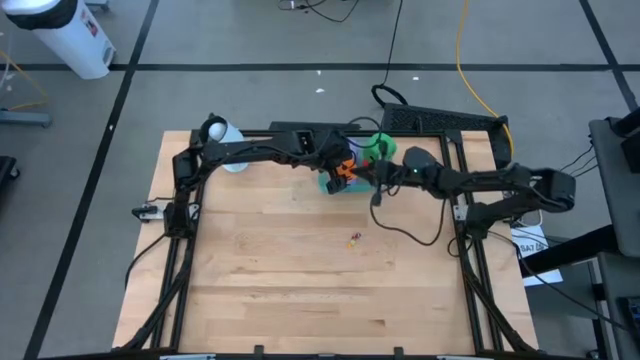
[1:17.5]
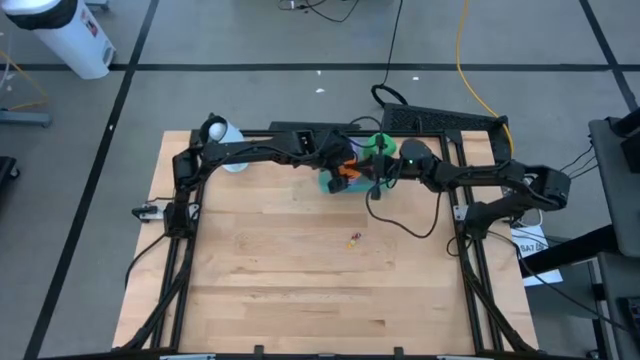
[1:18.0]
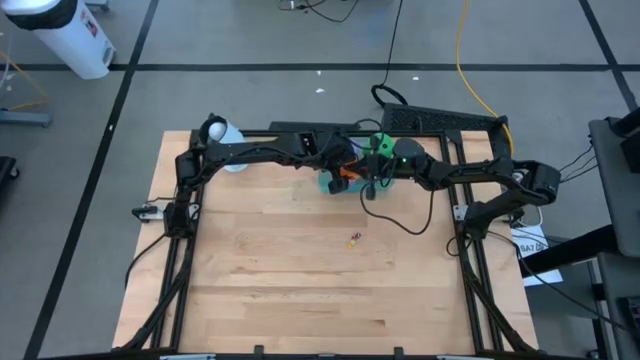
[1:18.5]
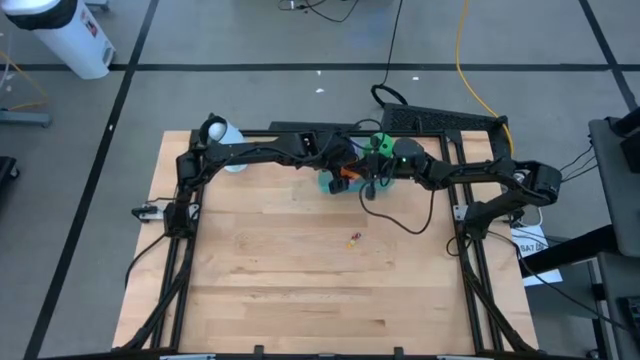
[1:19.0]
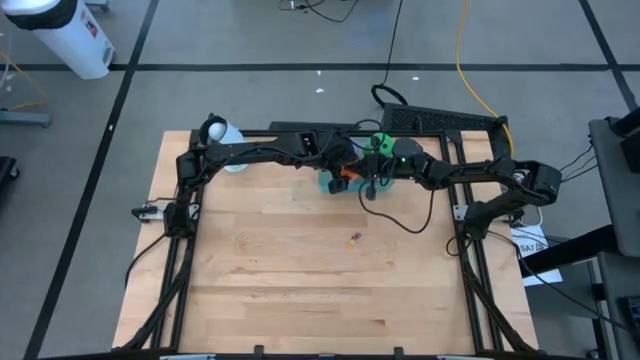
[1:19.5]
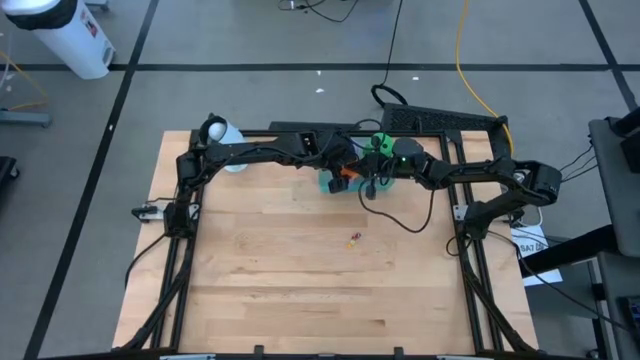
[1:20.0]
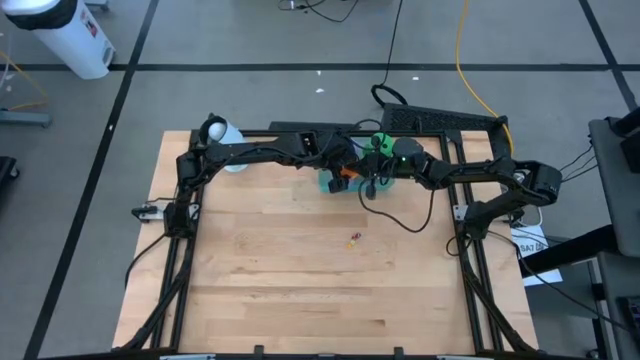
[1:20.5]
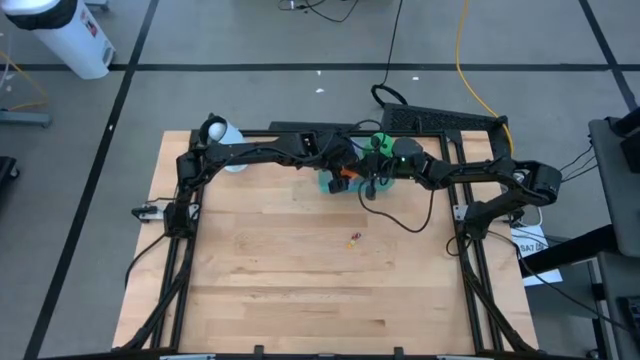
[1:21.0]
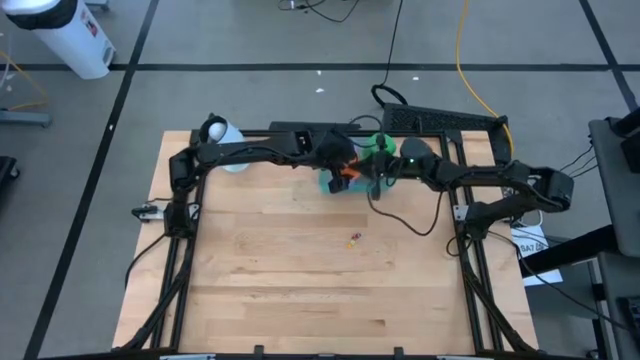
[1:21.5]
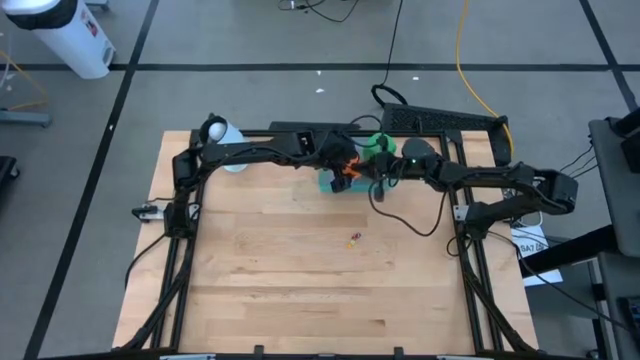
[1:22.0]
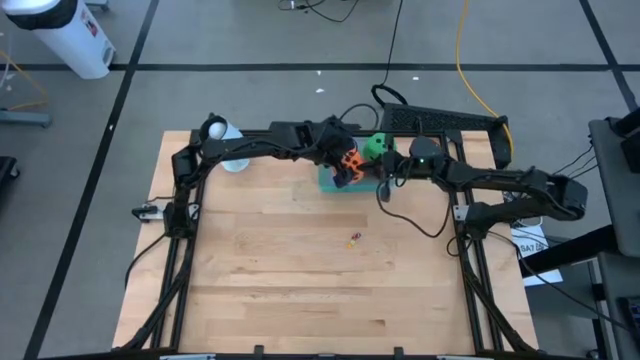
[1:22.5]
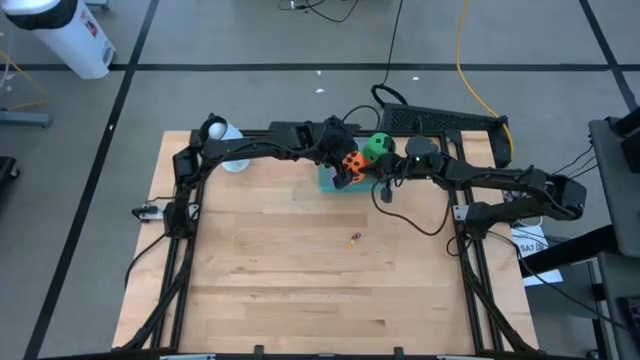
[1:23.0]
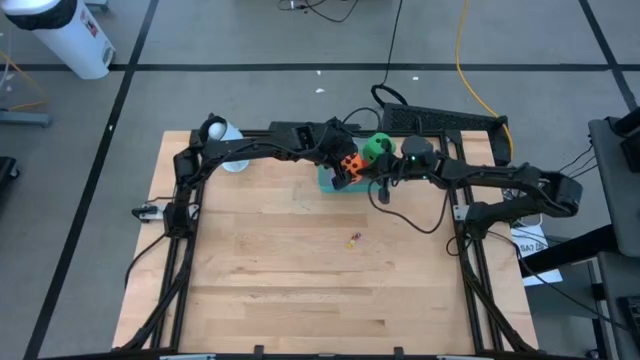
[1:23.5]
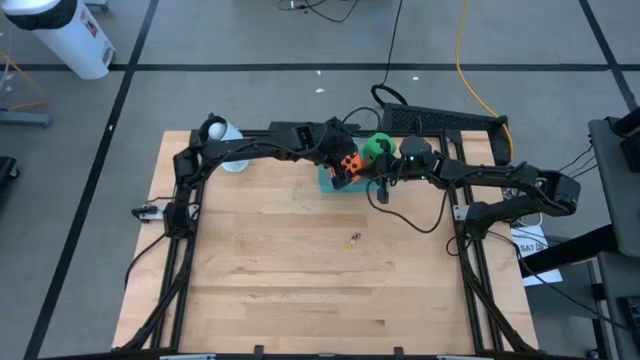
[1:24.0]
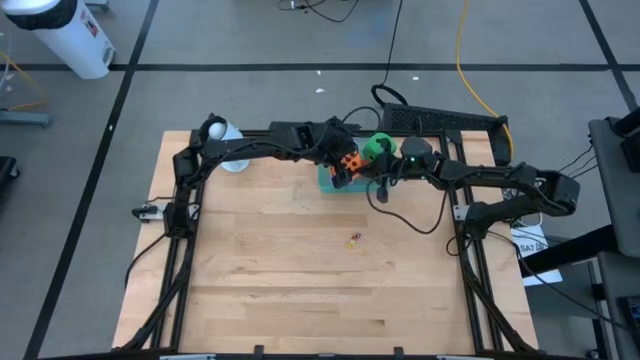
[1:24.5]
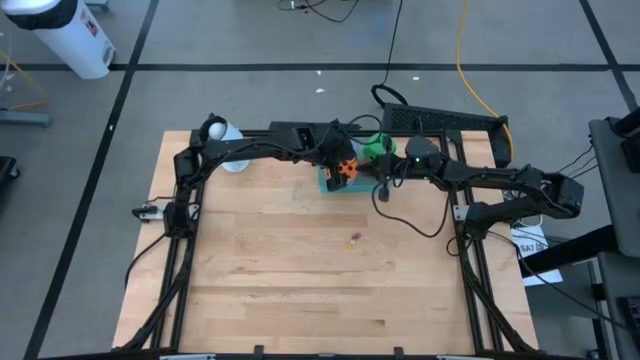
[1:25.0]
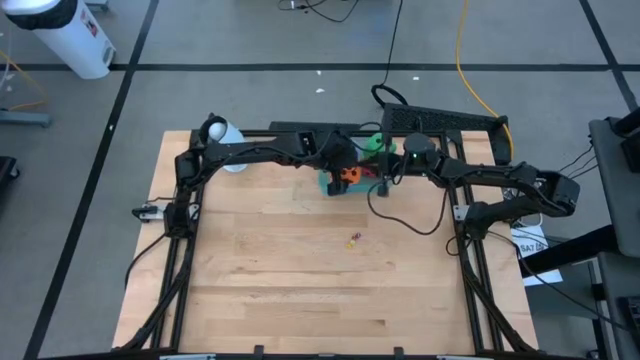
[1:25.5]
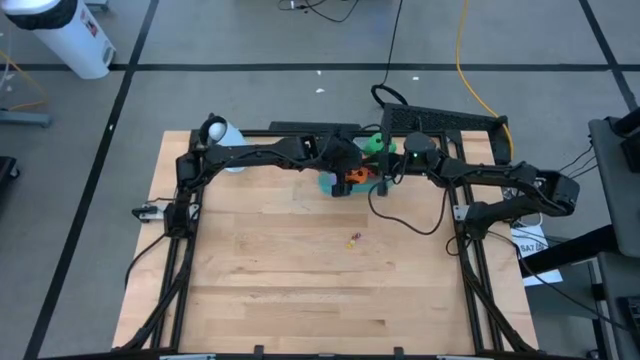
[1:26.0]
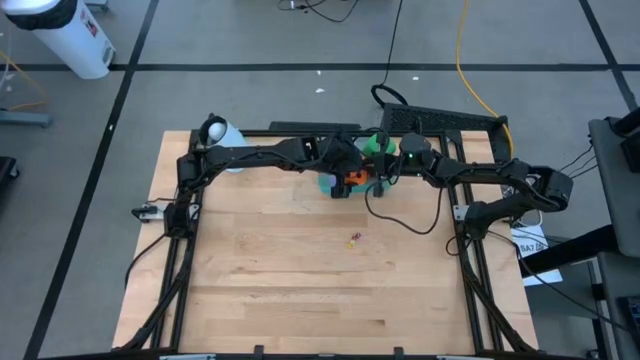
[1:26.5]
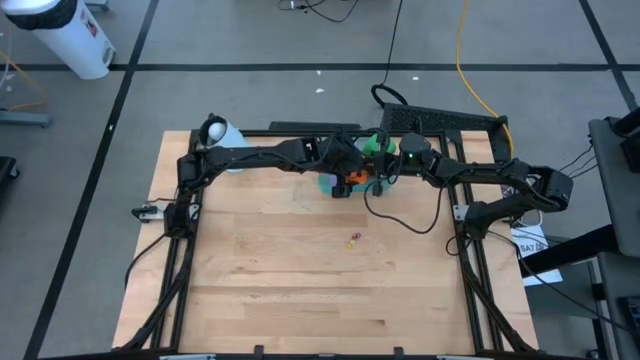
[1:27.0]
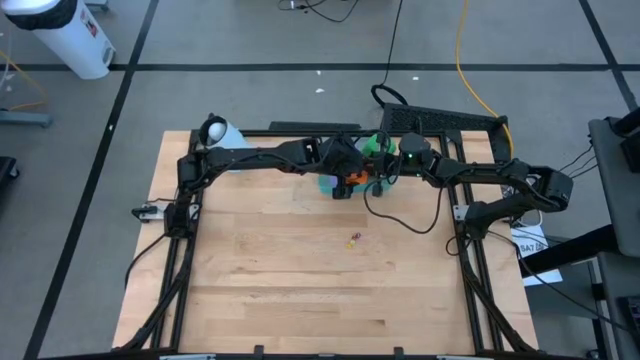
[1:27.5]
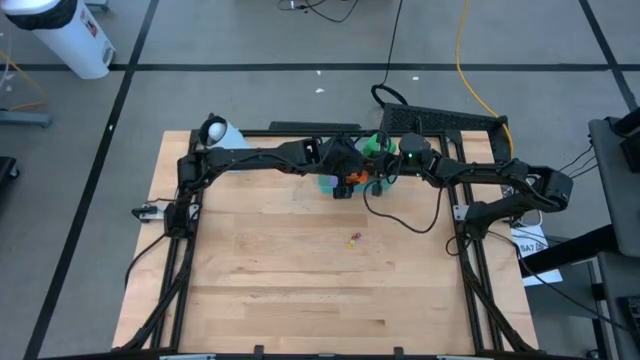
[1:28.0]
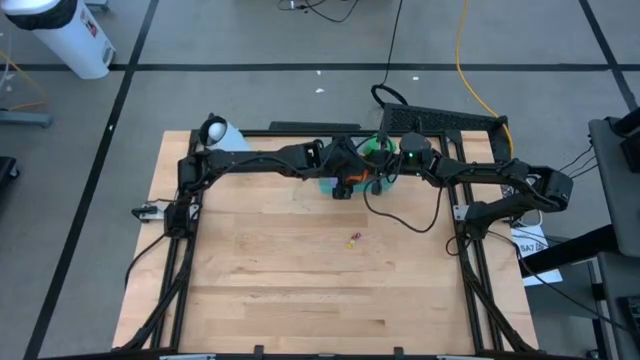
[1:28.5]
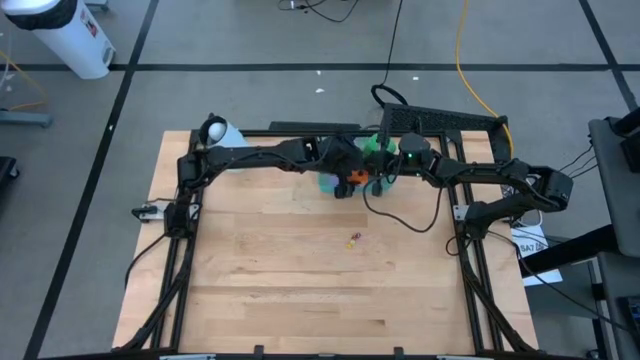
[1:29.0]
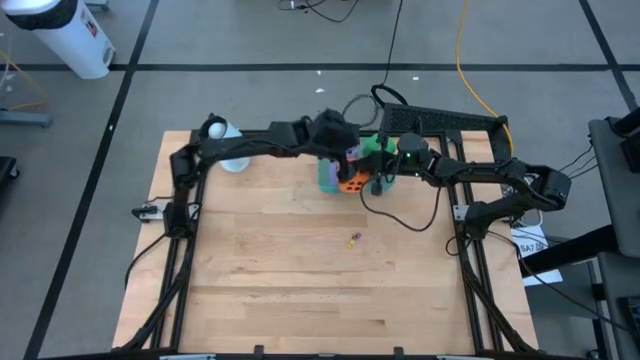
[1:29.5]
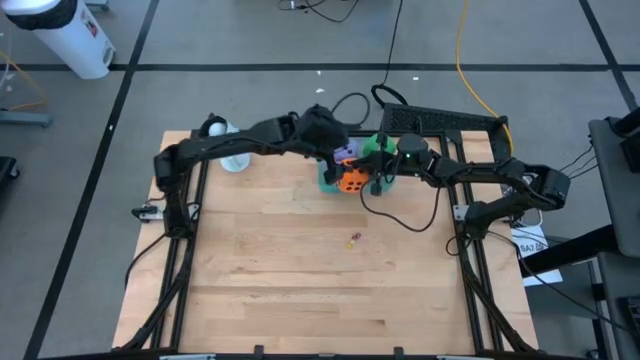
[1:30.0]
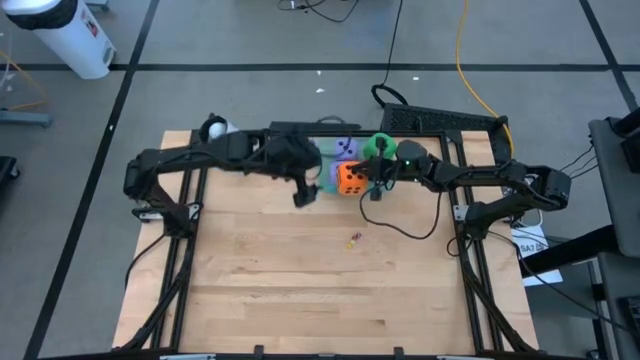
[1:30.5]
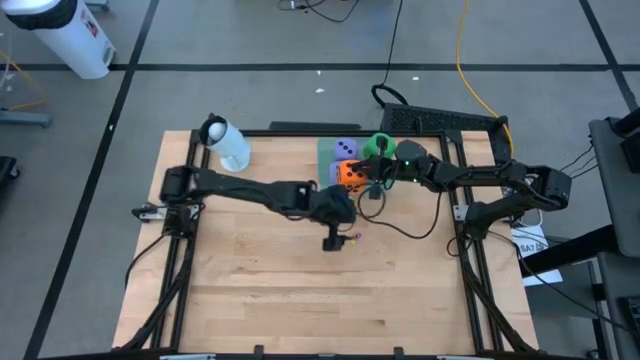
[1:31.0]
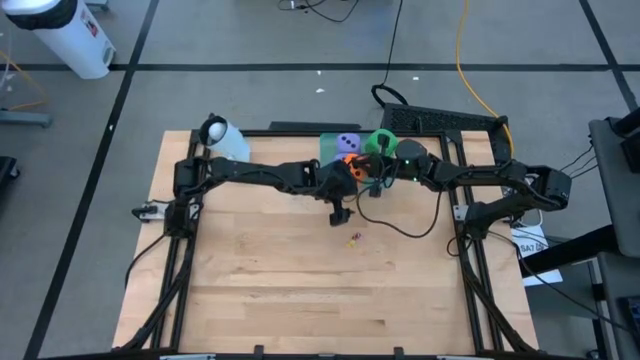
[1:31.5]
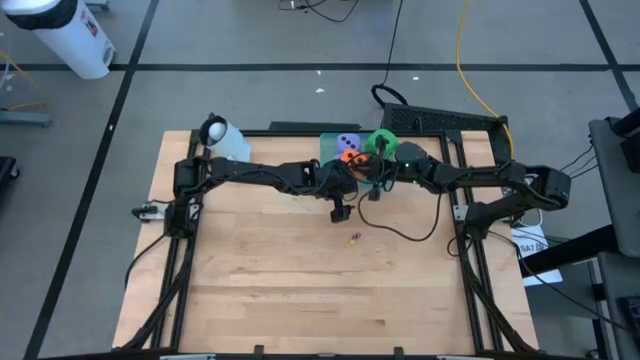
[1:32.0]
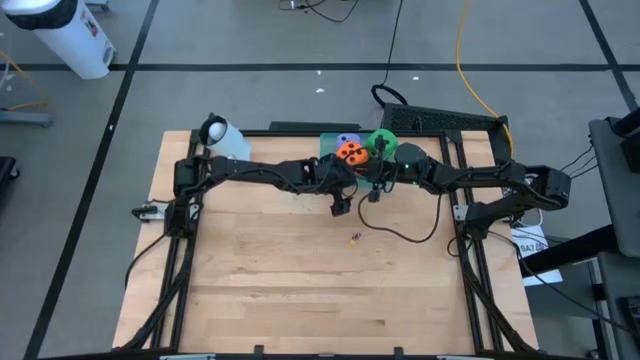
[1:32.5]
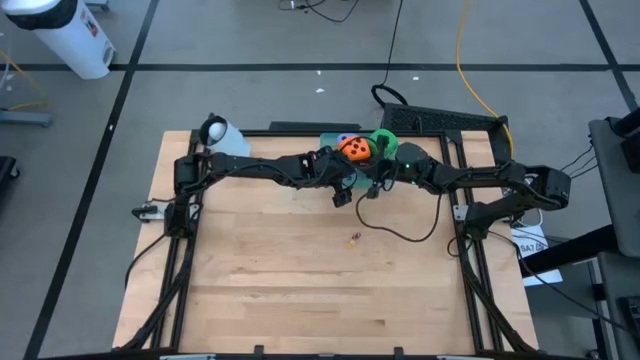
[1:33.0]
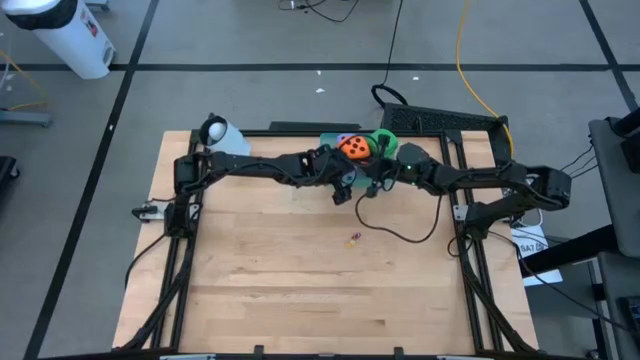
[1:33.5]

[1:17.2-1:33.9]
Task: Pick & Place Dice
Put the large orange die into the bin

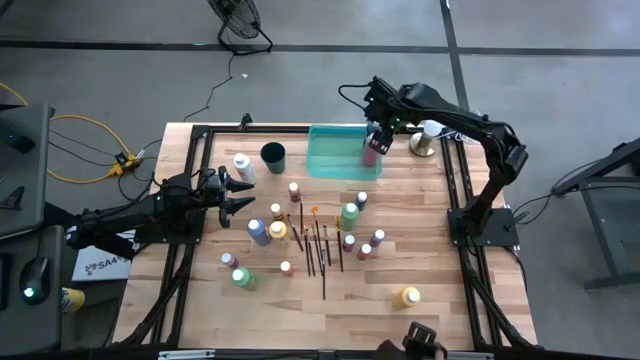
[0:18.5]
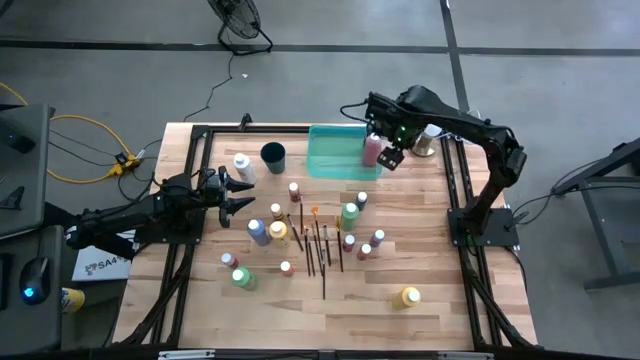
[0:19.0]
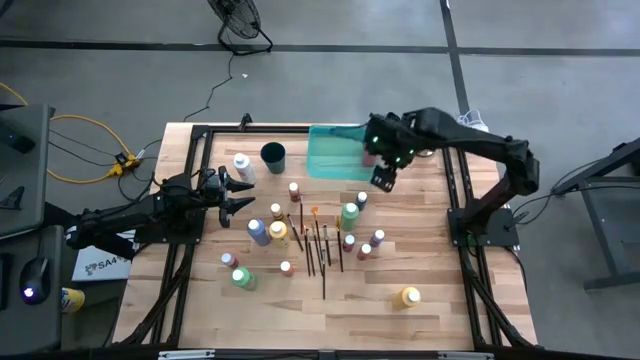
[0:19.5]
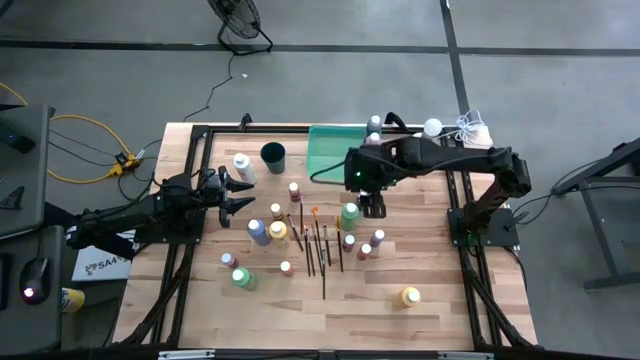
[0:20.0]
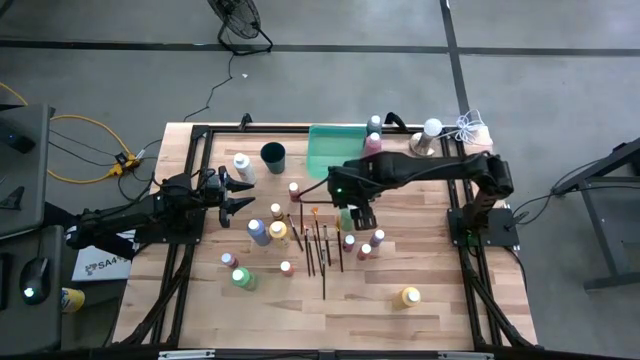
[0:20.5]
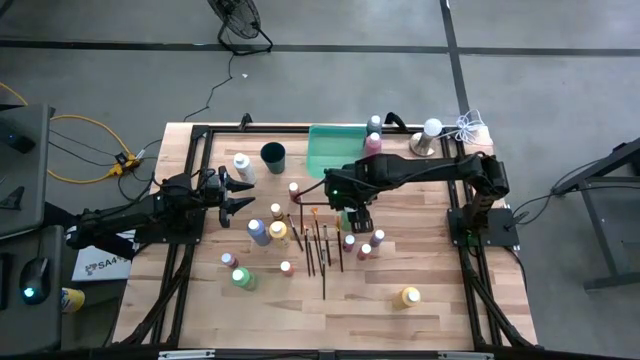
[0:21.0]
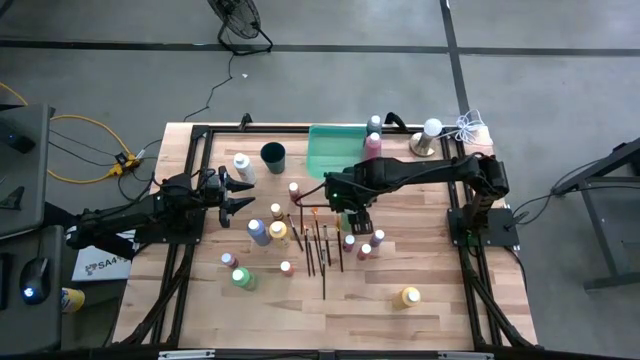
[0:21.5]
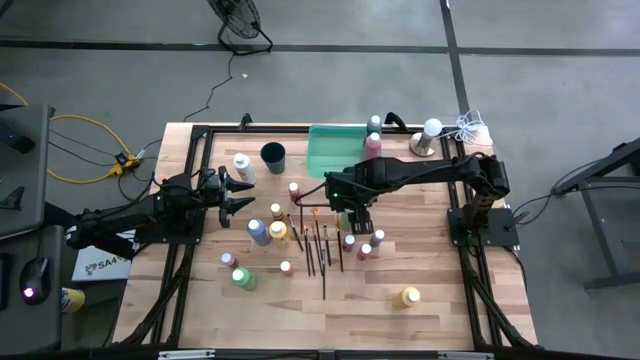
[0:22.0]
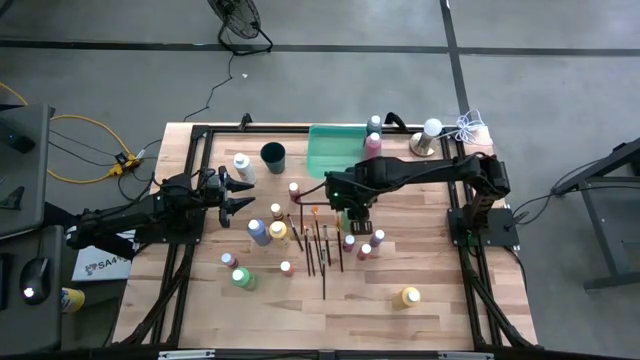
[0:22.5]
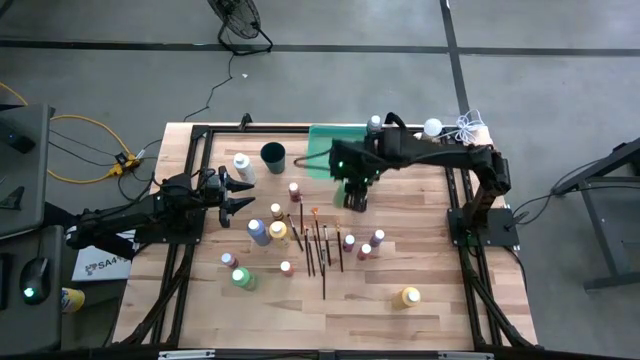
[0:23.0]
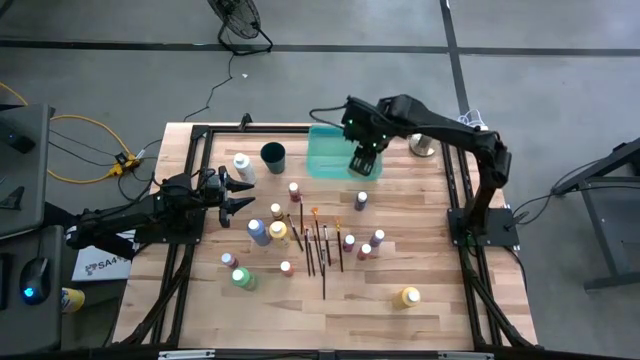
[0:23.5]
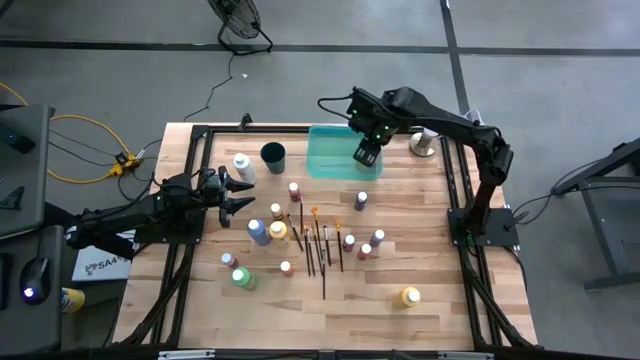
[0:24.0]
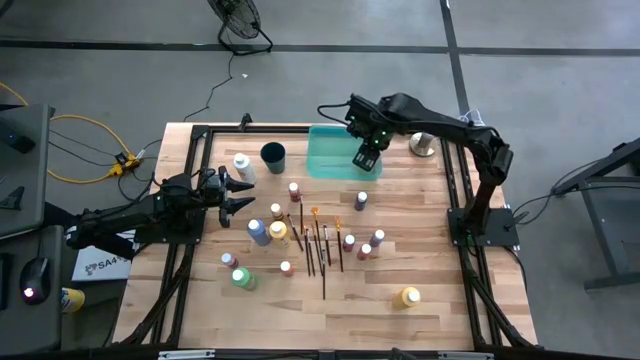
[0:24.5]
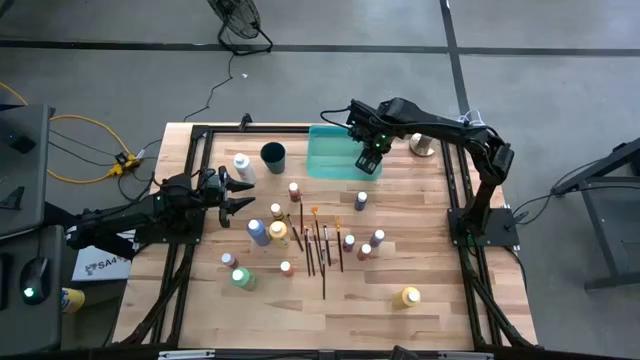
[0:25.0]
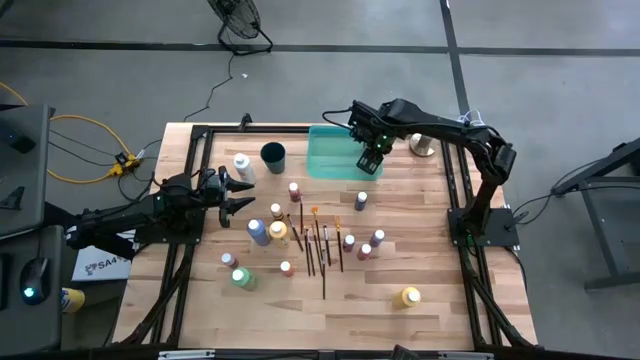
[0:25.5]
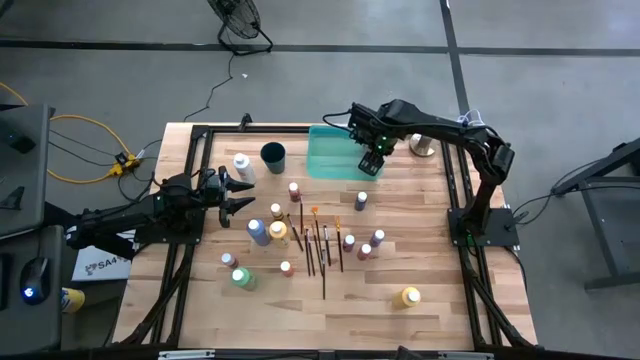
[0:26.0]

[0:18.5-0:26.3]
Task: Pick & Place Paint Supplies
Put the large green paint bottle into the green bin
